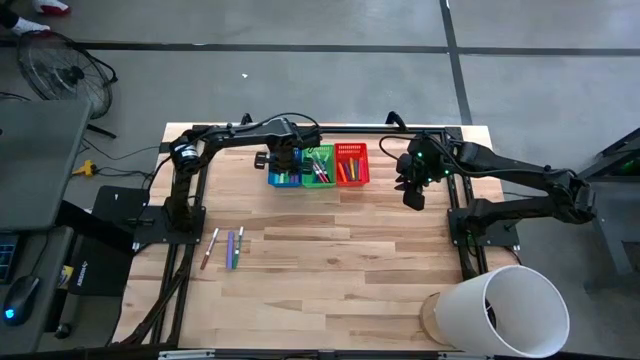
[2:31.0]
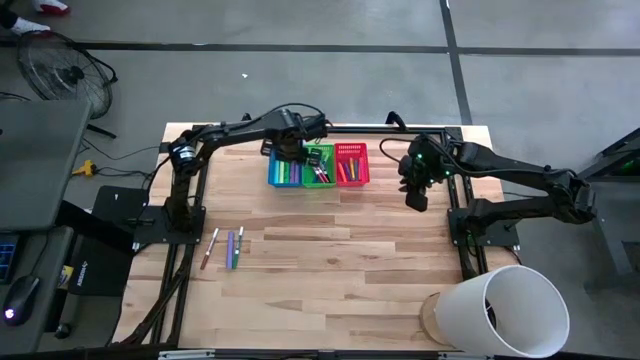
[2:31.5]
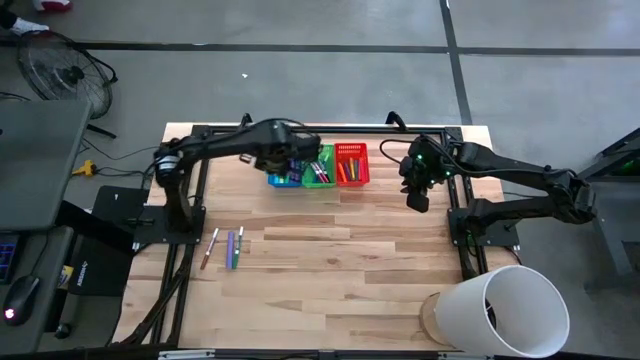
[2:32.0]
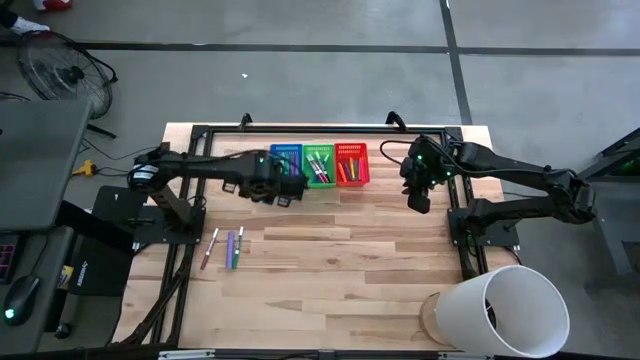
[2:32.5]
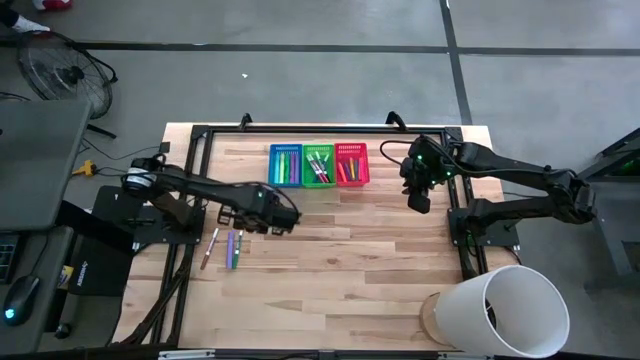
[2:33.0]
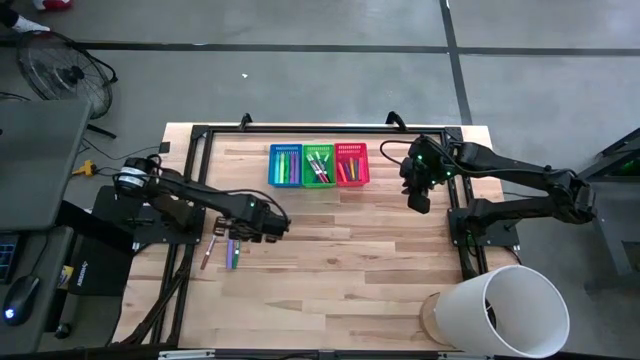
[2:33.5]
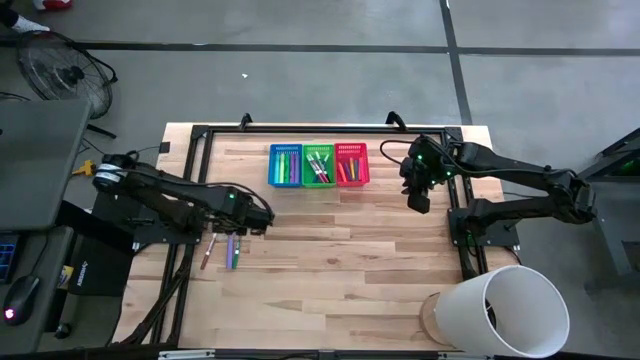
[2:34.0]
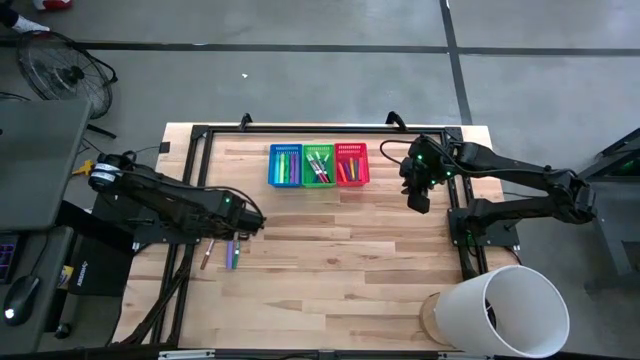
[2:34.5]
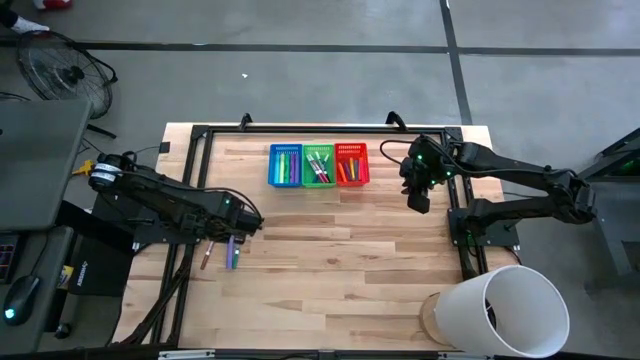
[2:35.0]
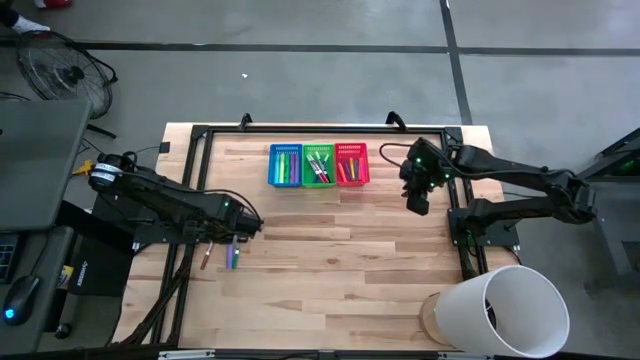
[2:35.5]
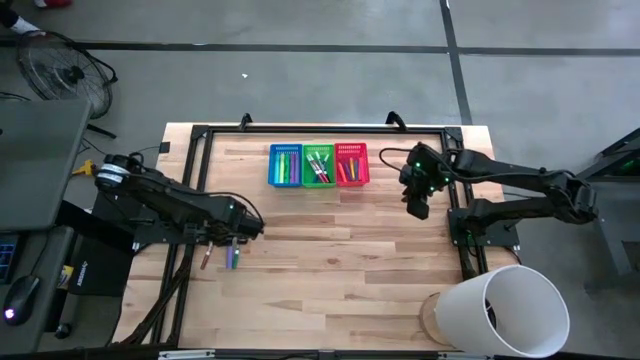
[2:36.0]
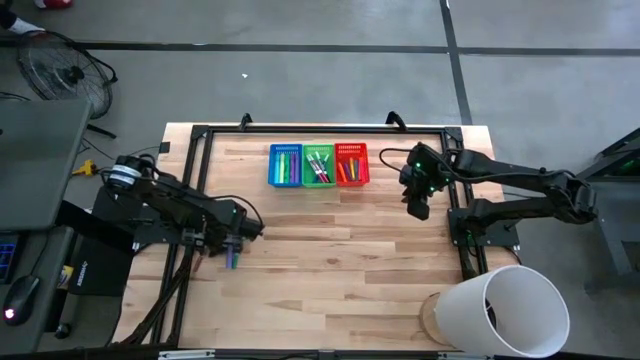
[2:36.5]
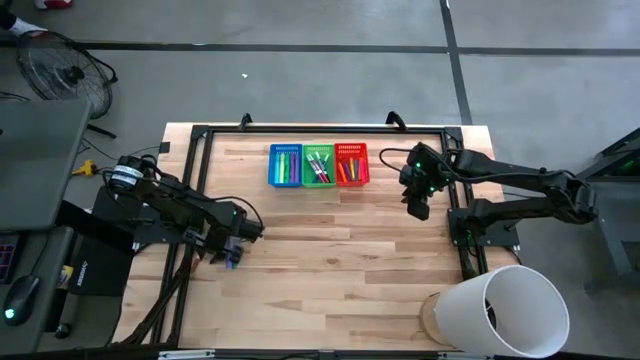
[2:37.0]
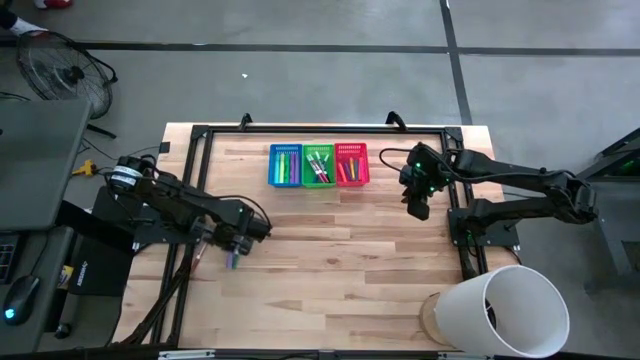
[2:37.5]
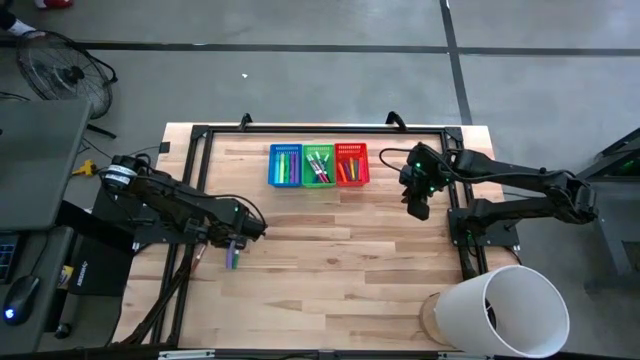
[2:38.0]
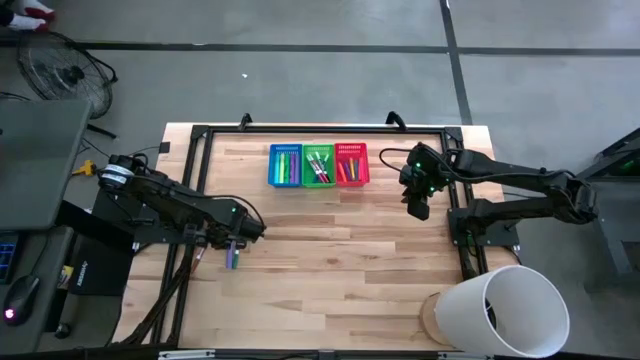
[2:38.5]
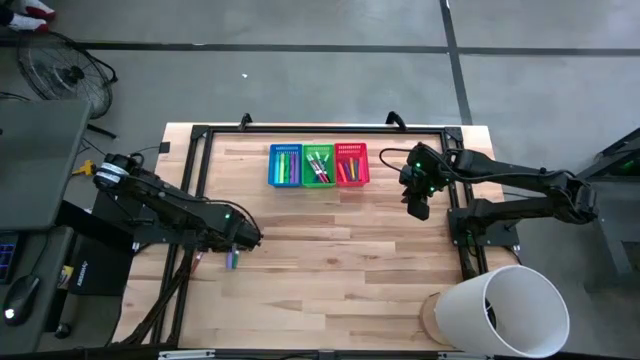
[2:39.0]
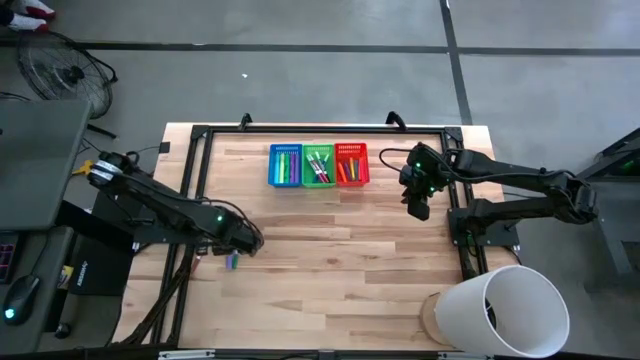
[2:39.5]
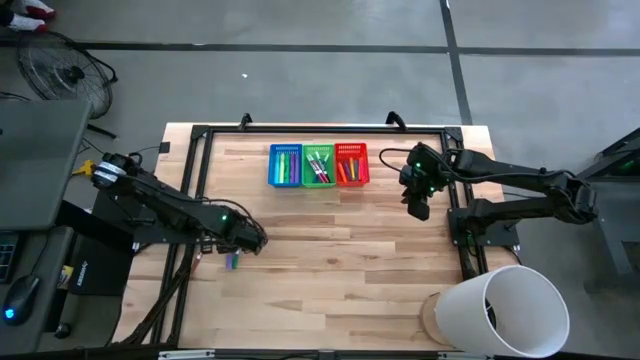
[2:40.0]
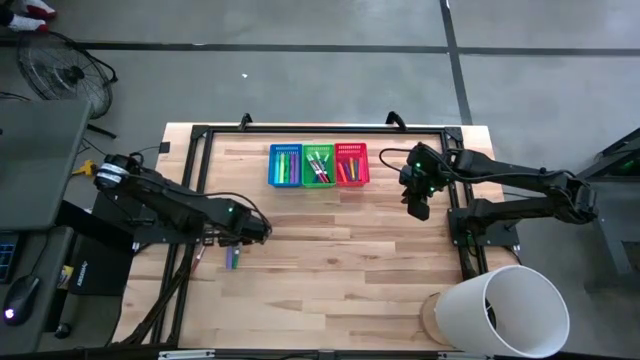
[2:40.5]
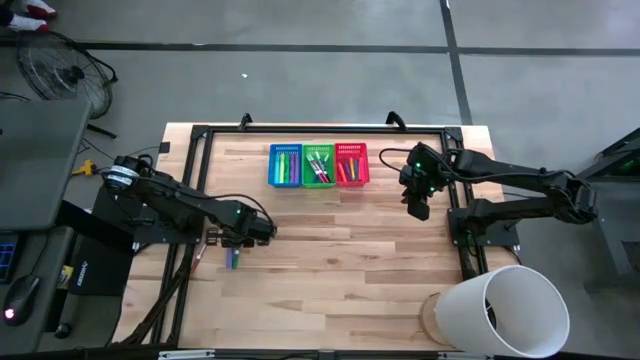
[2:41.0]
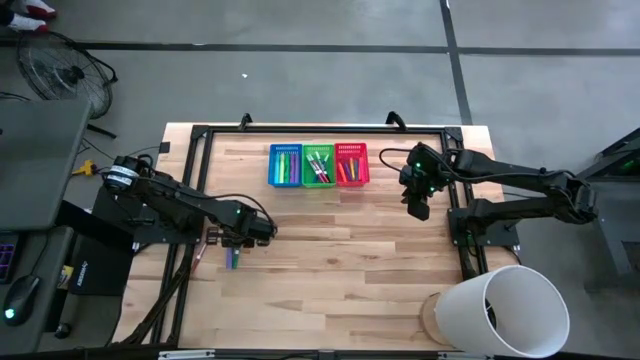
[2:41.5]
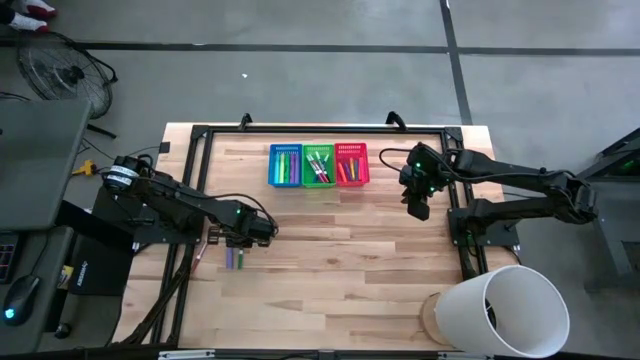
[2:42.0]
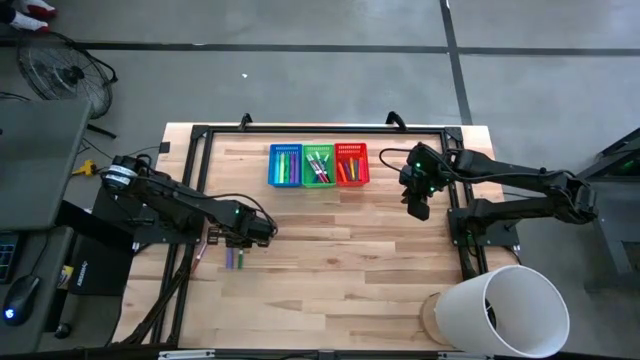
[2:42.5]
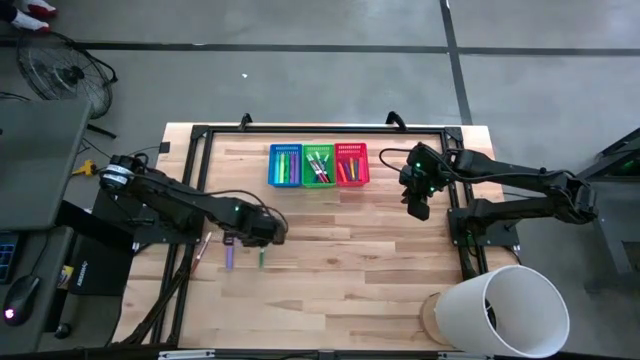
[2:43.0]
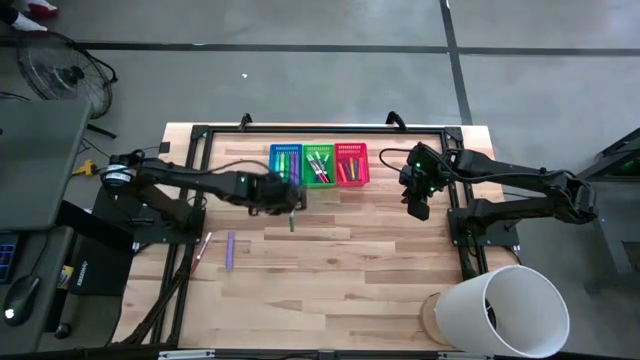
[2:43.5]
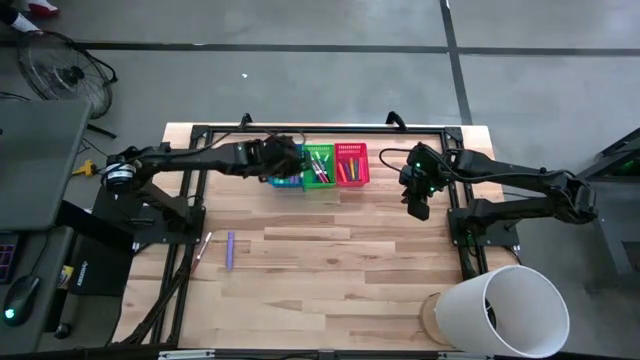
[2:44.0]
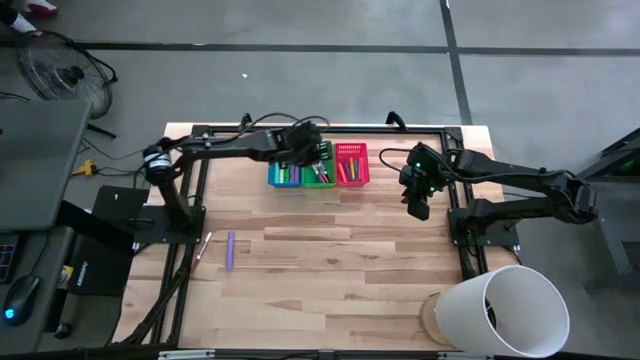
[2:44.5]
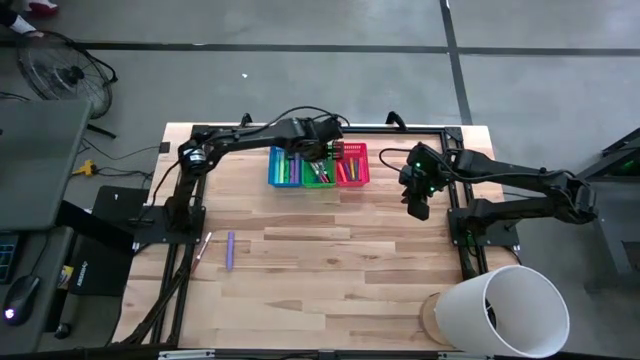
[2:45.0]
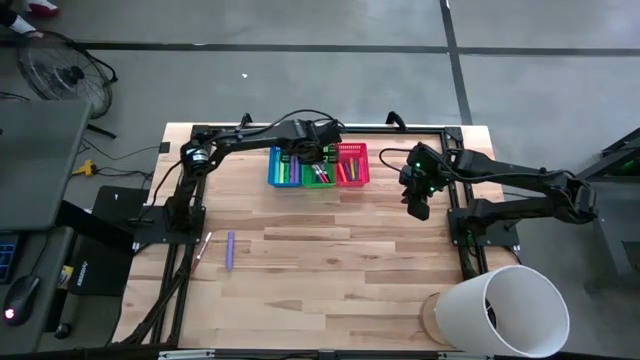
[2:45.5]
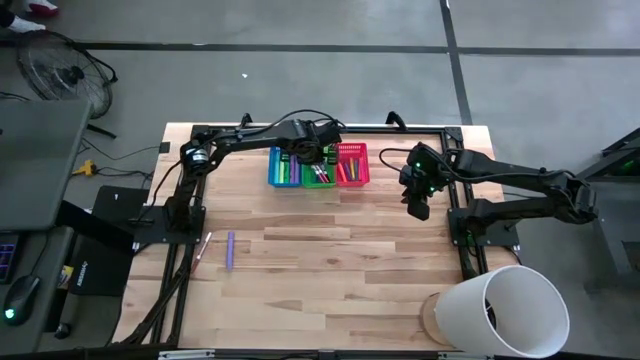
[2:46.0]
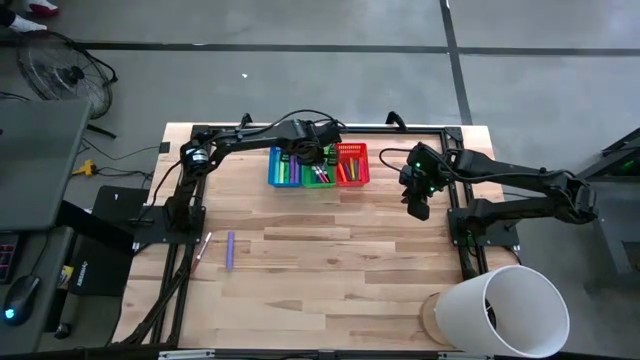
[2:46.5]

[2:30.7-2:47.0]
Task: Pick & Place Markers
Put the green marker pen into the green bin
